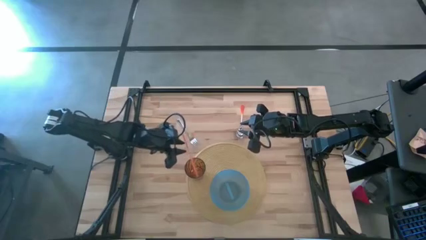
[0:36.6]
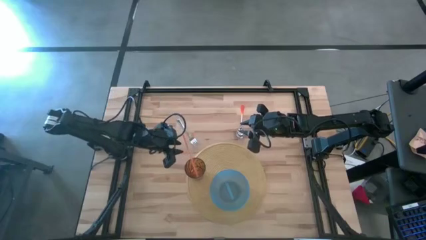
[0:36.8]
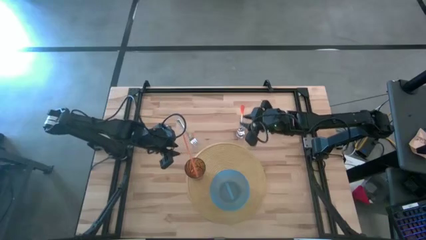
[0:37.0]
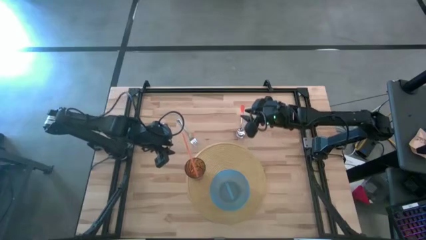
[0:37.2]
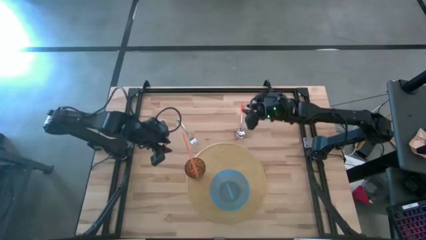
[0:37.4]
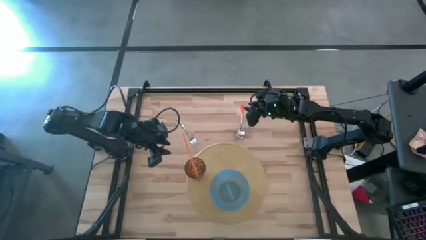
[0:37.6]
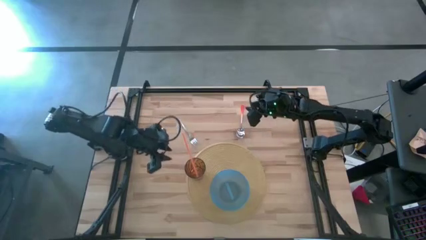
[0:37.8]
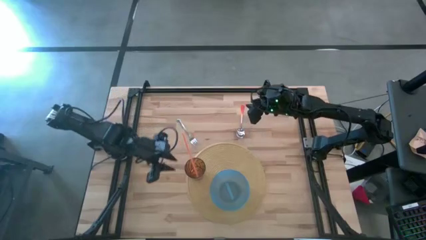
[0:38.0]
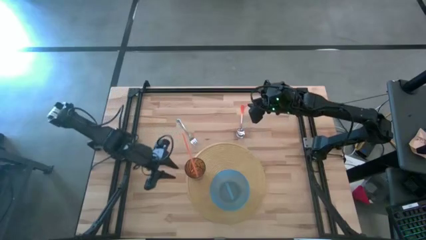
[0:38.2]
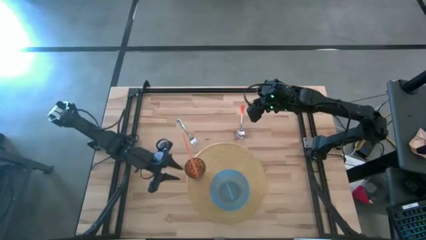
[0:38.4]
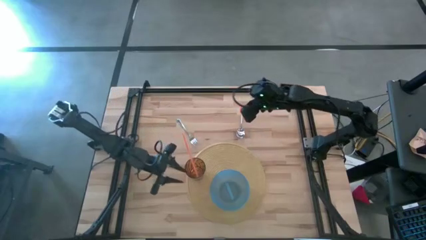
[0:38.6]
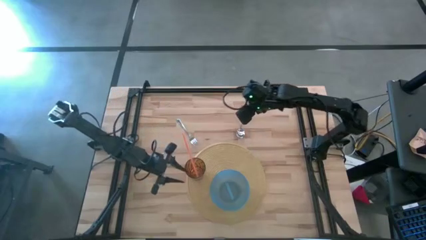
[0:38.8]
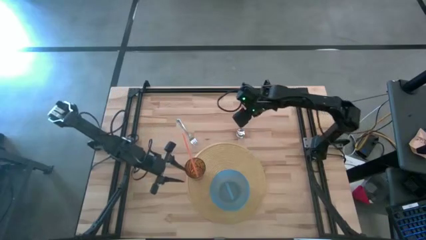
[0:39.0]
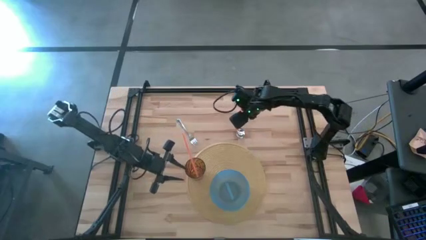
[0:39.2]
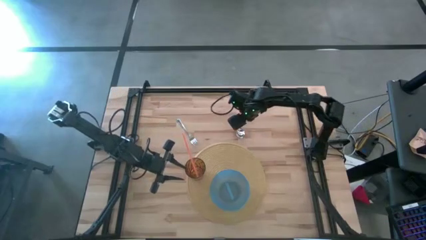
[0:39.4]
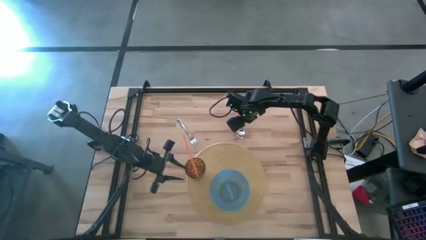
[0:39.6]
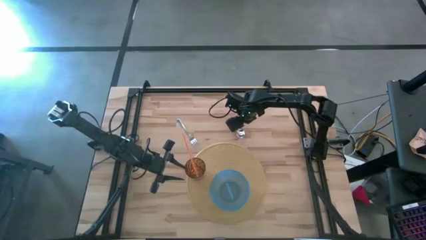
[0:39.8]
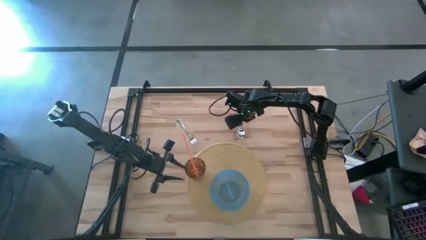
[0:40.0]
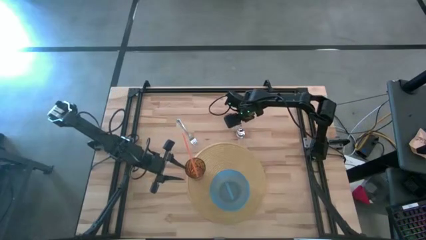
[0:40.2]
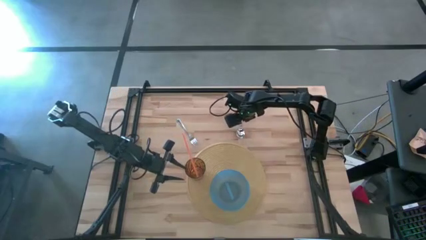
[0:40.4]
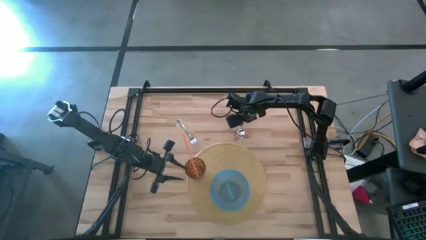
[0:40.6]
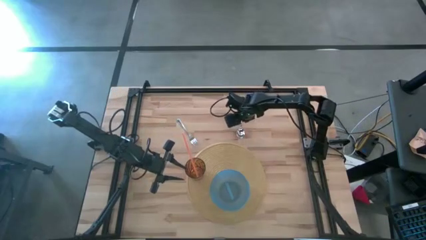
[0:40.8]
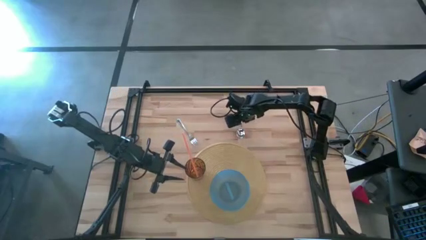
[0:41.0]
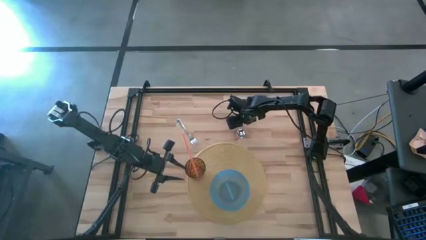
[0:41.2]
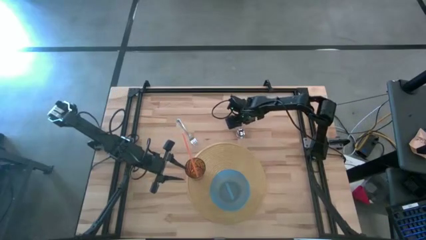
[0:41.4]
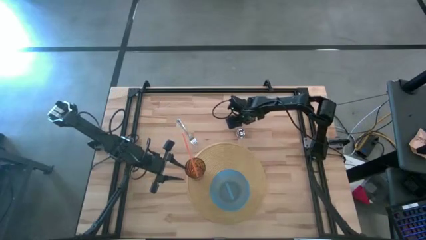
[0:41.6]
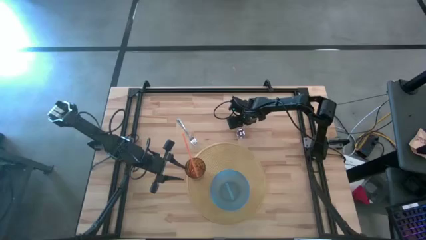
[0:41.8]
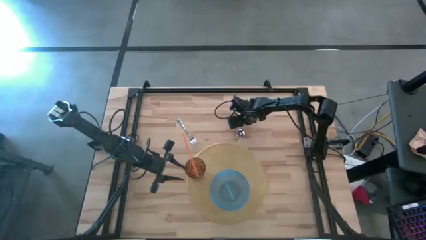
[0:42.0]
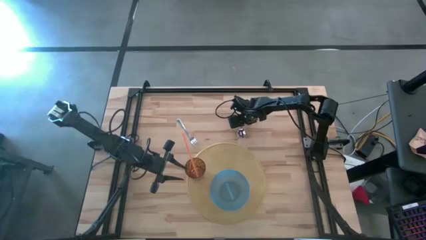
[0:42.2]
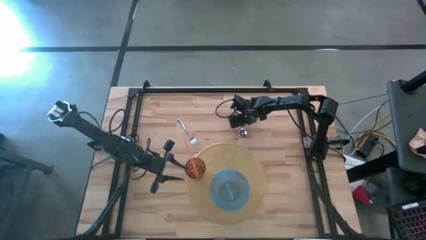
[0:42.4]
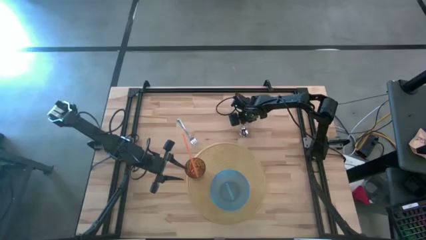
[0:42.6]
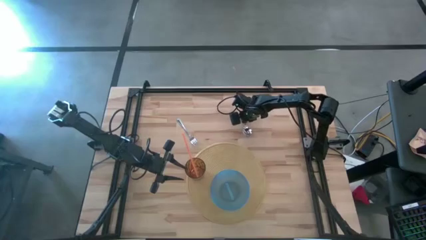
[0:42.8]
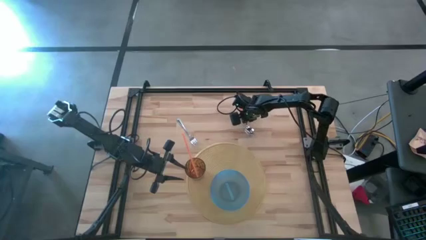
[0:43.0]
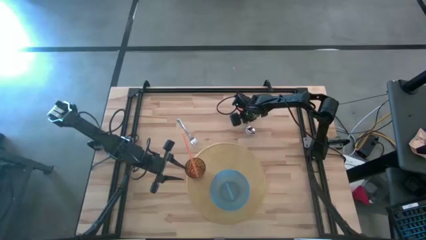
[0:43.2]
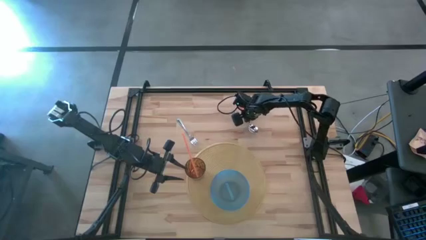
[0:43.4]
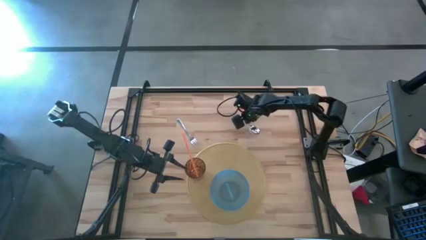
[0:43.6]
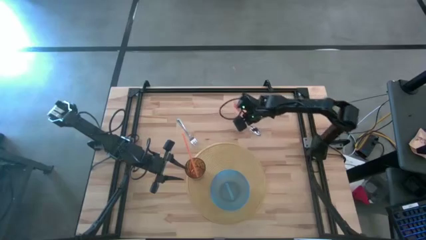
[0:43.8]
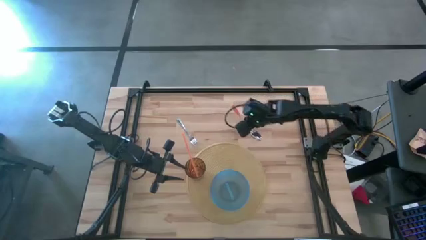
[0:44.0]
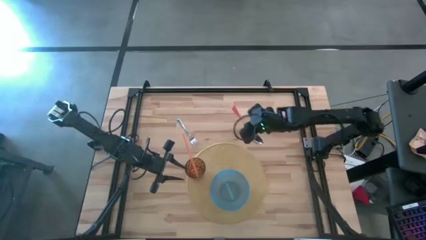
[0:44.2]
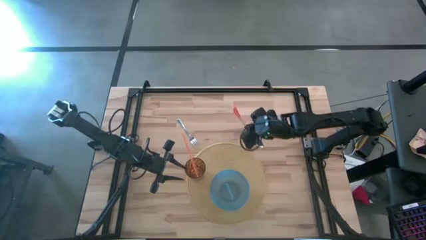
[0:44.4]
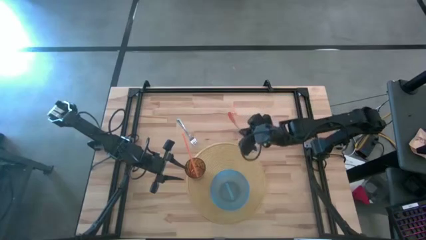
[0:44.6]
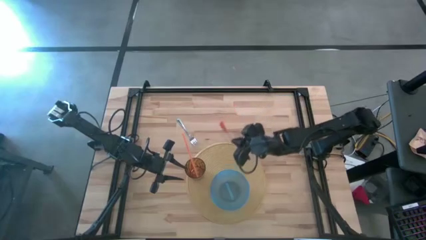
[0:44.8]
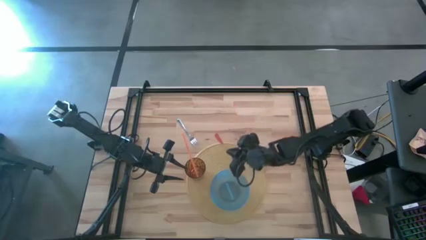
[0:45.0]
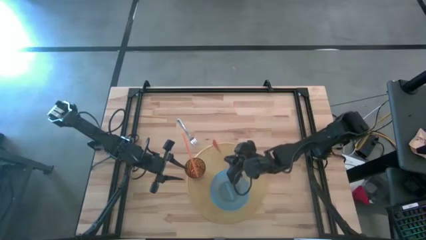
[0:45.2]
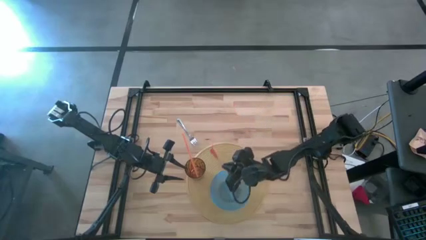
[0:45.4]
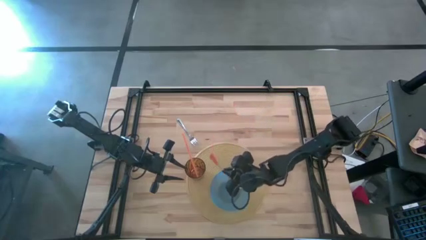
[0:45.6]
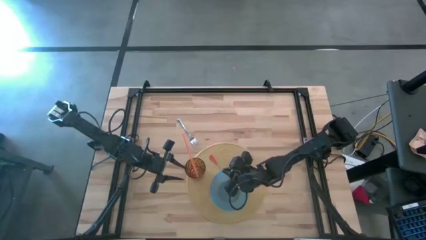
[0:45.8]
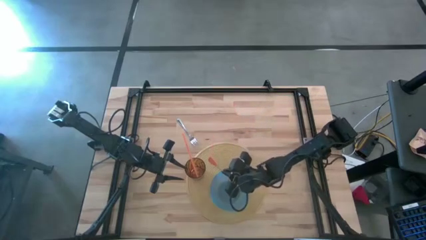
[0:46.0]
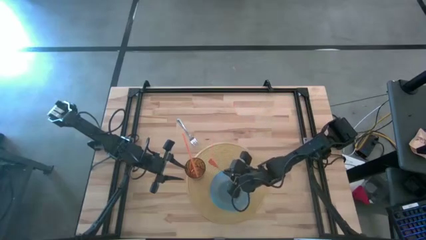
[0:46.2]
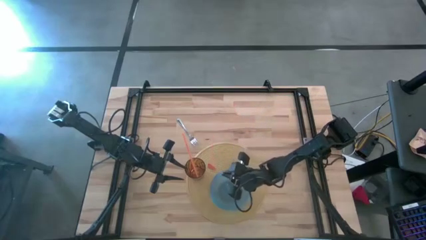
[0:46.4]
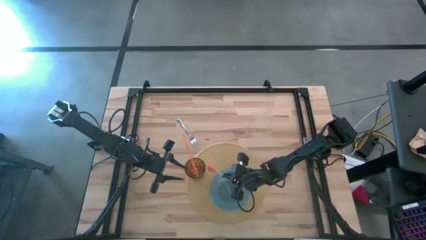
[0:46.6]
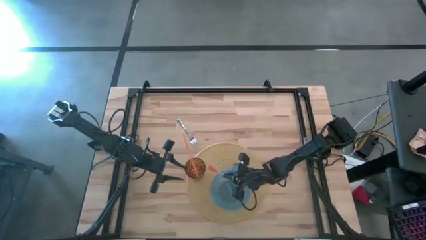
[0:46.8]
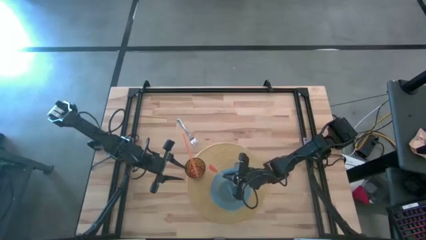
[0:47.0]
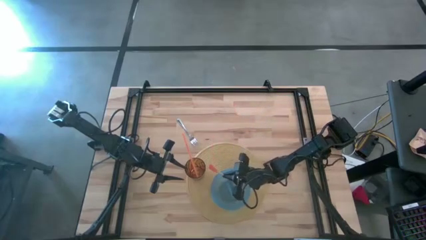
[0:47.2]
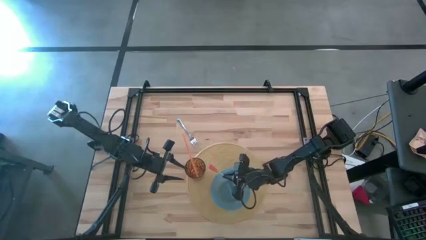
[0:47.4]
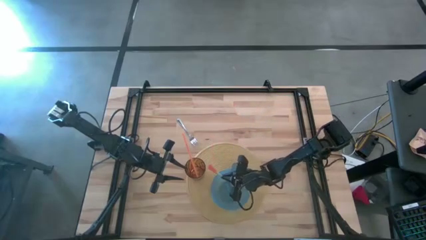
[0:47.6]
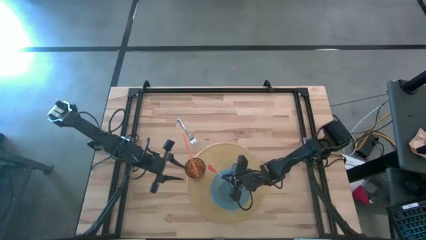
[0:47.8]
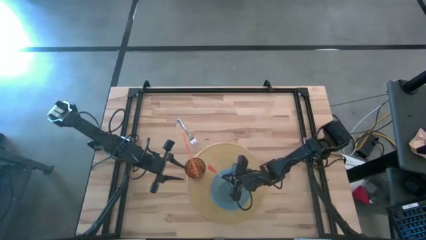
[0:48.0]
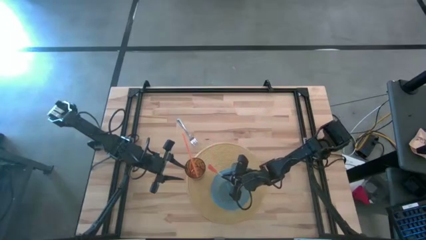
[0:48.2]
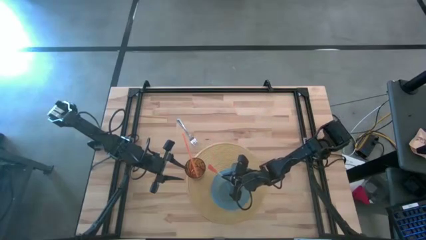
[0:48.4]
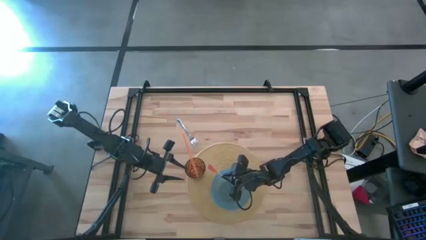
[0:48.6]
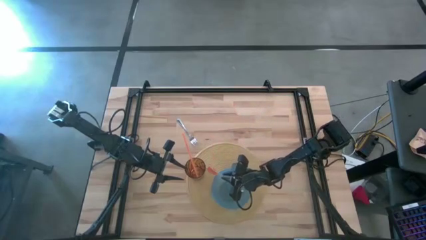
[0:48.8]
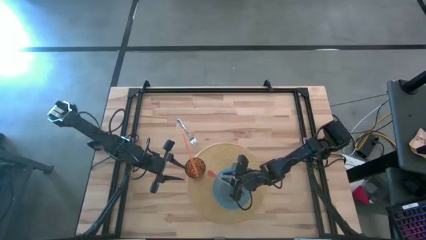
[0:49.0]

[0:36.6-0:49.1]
Task: Pick & Place Utensil
Put the orange spoon into the blue bowl on the brown mat
